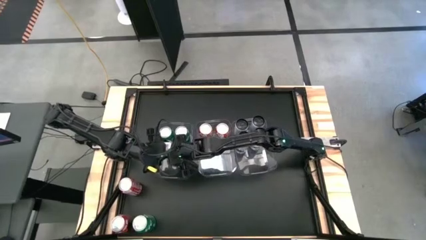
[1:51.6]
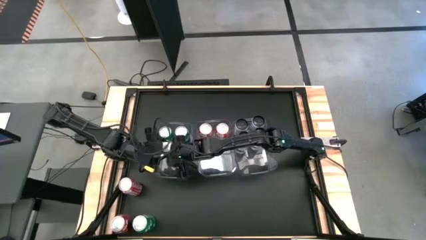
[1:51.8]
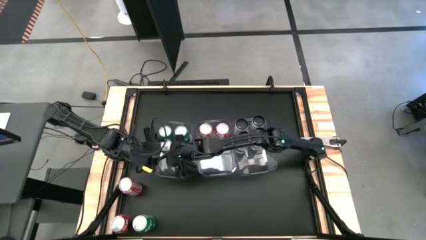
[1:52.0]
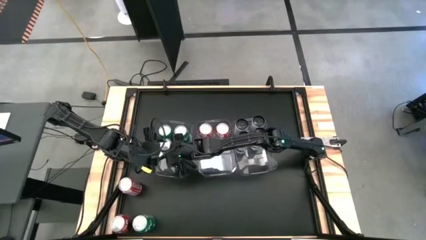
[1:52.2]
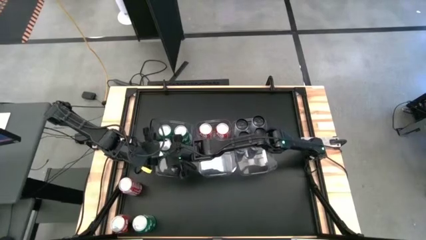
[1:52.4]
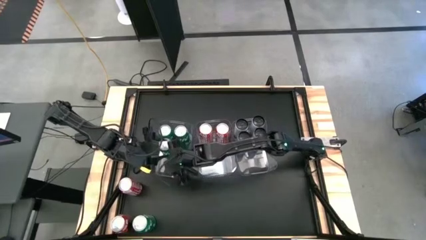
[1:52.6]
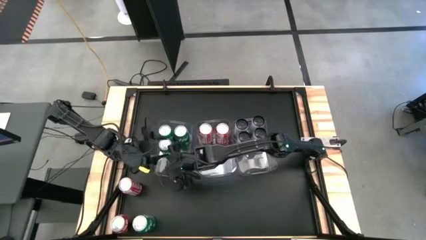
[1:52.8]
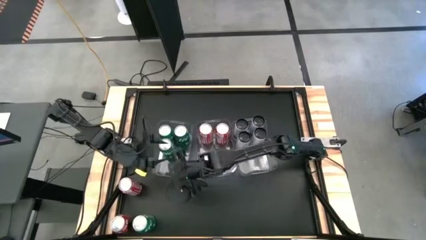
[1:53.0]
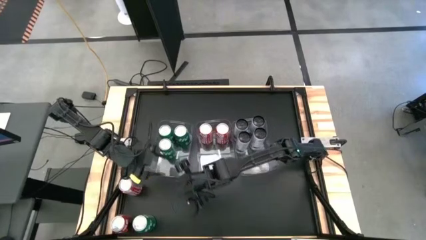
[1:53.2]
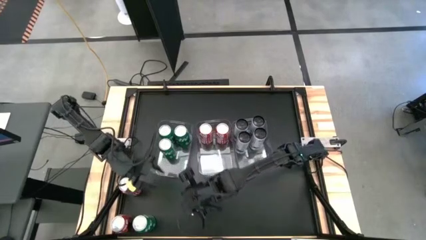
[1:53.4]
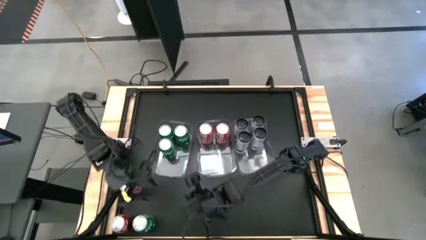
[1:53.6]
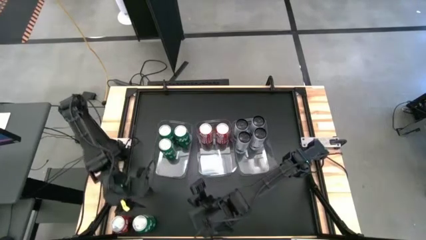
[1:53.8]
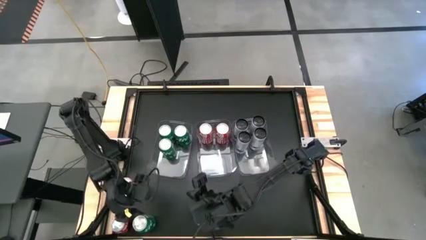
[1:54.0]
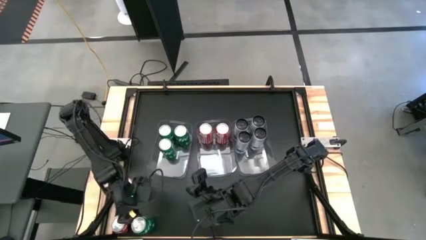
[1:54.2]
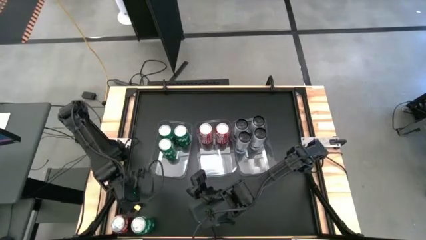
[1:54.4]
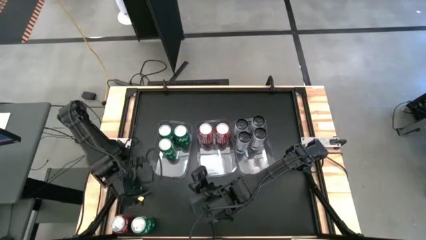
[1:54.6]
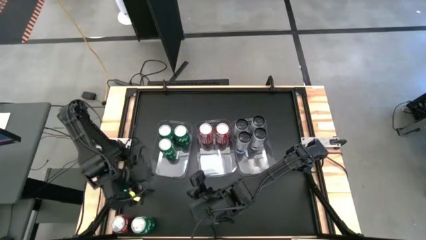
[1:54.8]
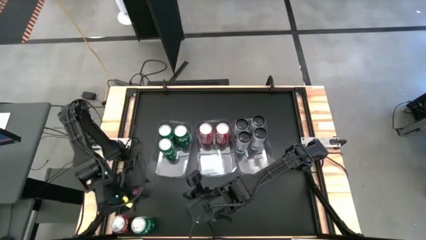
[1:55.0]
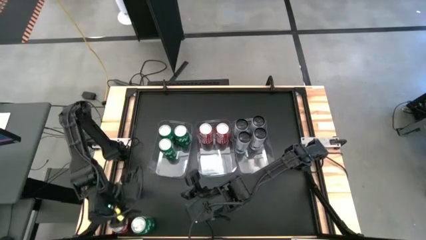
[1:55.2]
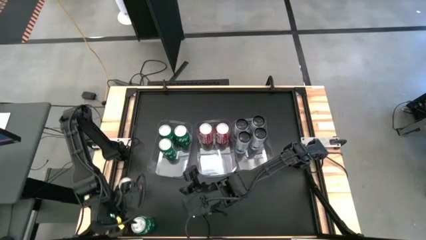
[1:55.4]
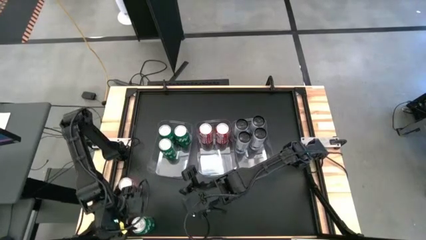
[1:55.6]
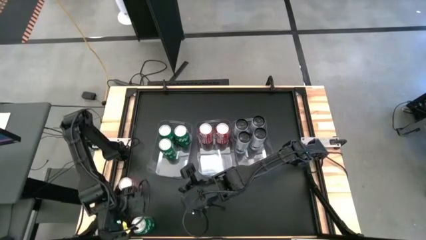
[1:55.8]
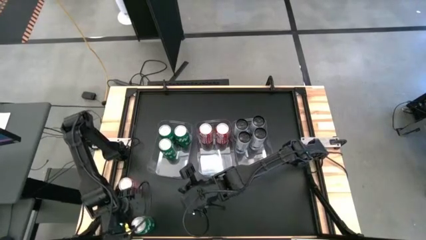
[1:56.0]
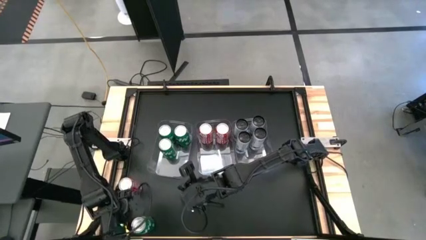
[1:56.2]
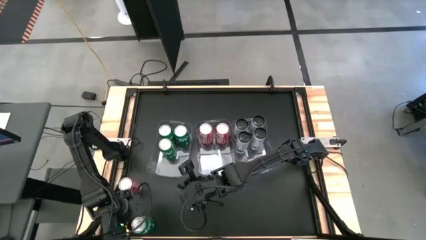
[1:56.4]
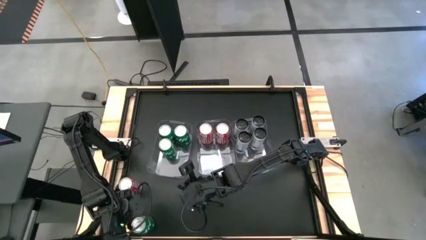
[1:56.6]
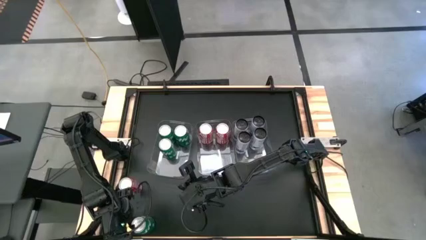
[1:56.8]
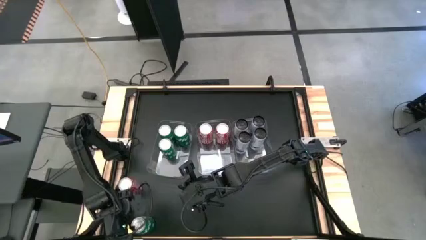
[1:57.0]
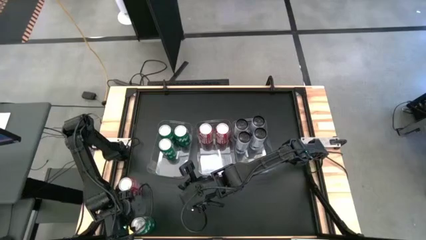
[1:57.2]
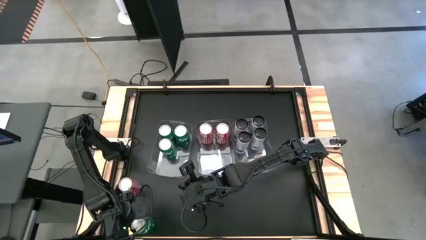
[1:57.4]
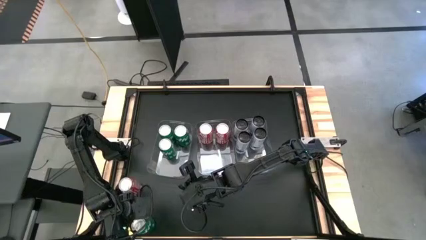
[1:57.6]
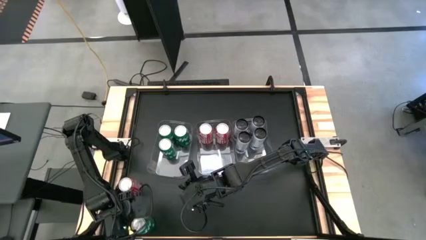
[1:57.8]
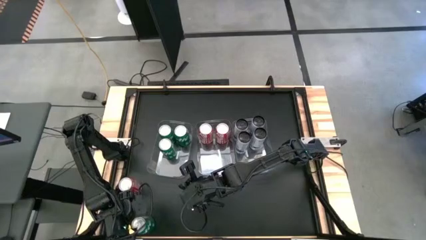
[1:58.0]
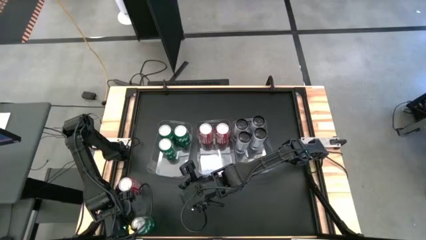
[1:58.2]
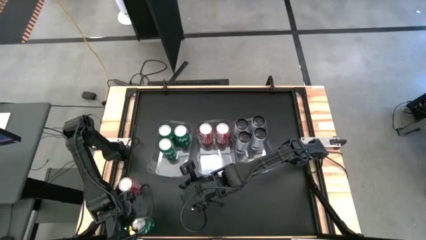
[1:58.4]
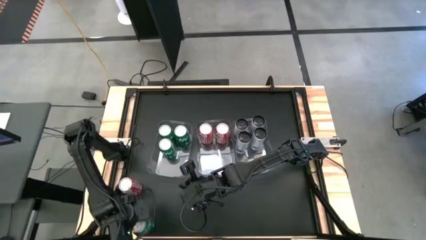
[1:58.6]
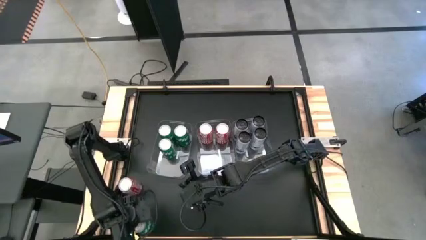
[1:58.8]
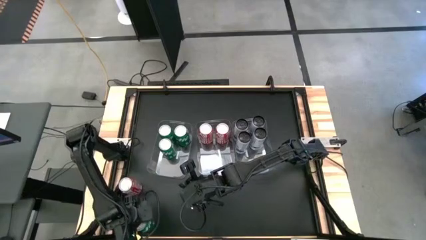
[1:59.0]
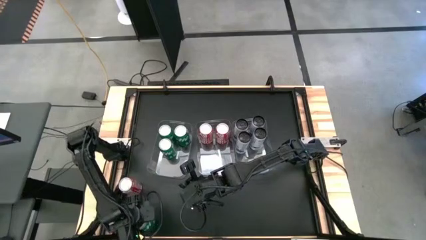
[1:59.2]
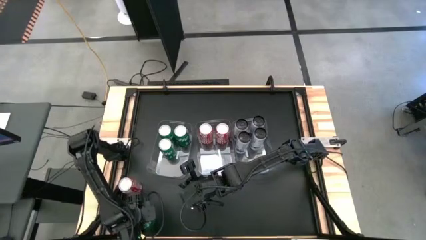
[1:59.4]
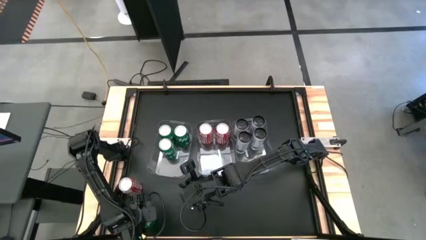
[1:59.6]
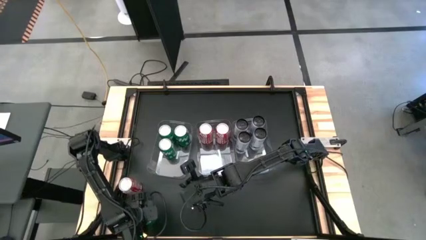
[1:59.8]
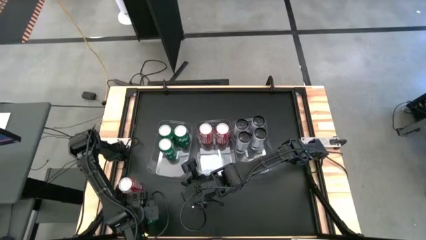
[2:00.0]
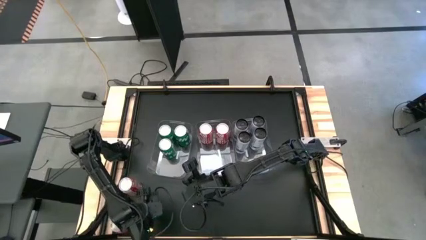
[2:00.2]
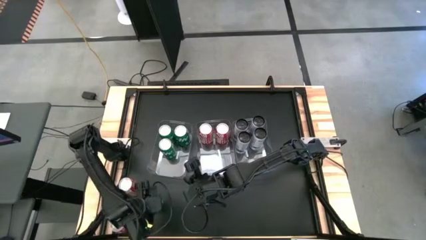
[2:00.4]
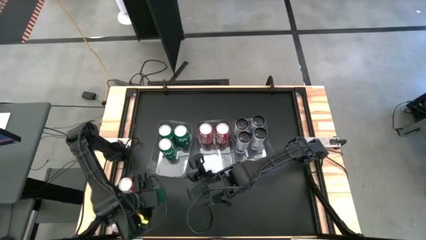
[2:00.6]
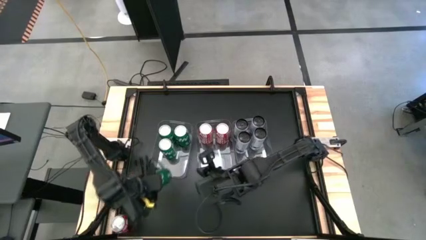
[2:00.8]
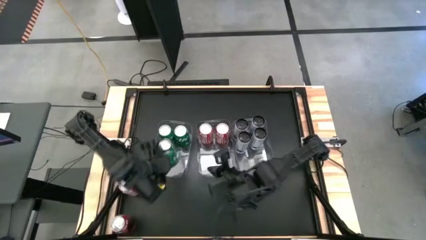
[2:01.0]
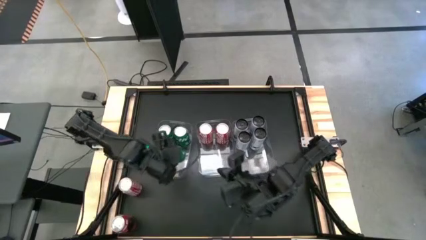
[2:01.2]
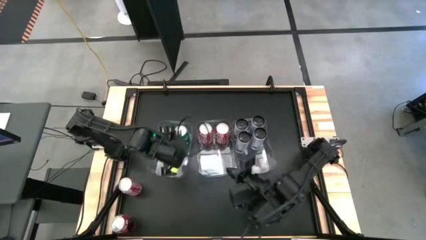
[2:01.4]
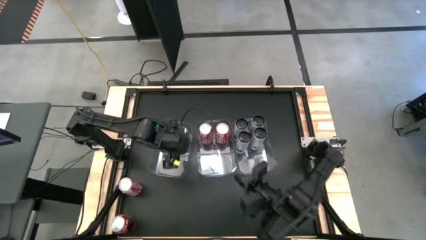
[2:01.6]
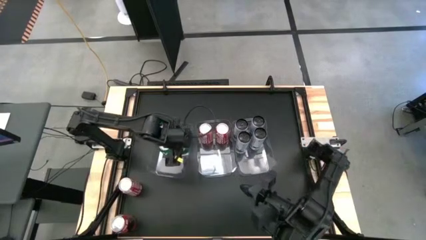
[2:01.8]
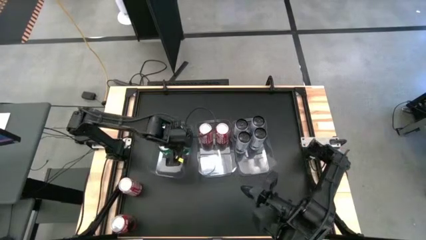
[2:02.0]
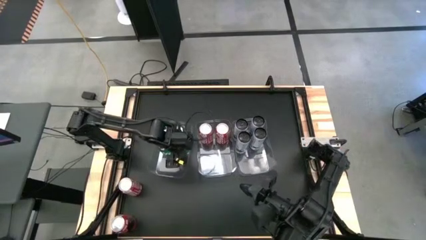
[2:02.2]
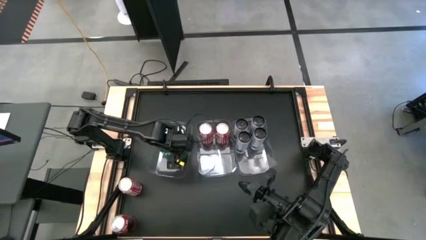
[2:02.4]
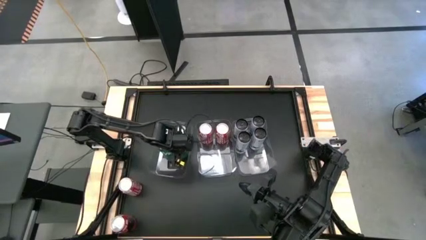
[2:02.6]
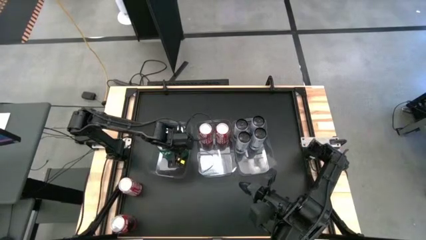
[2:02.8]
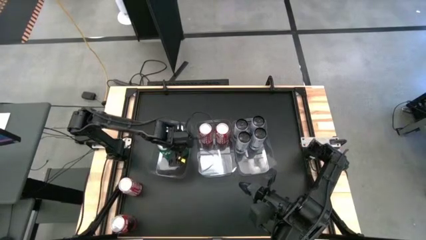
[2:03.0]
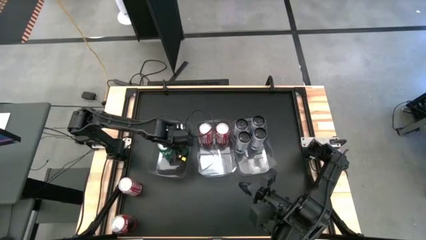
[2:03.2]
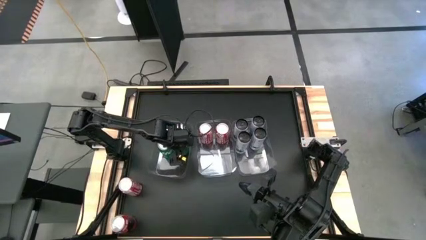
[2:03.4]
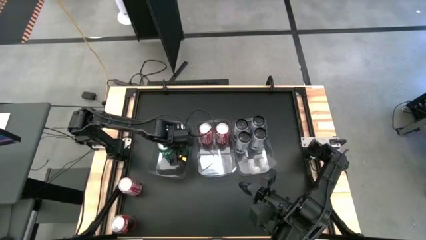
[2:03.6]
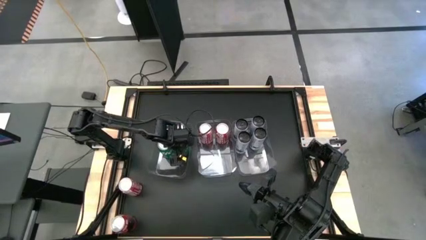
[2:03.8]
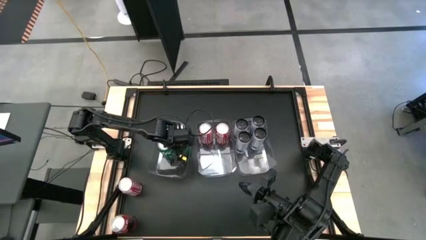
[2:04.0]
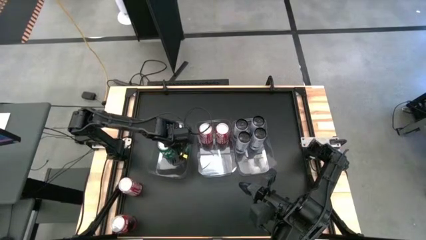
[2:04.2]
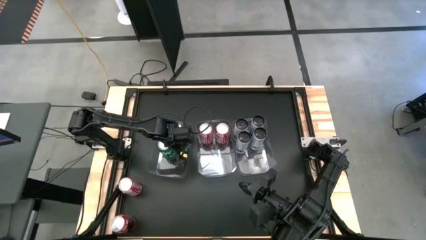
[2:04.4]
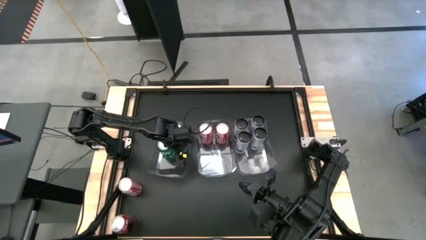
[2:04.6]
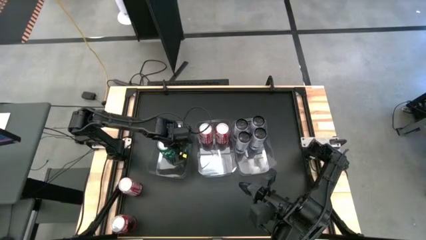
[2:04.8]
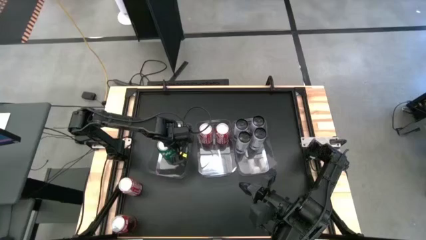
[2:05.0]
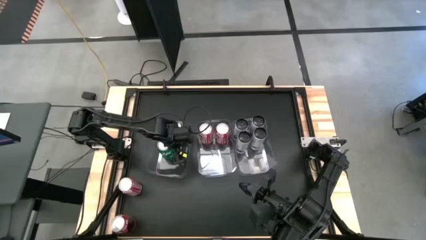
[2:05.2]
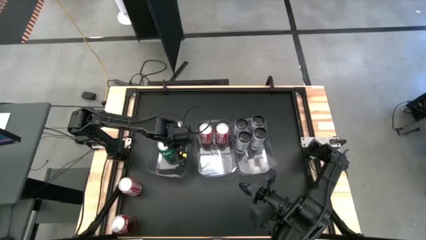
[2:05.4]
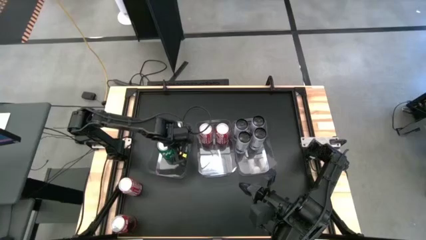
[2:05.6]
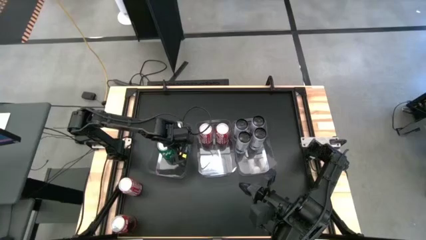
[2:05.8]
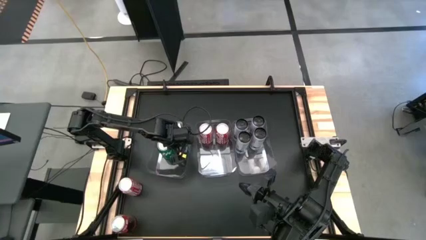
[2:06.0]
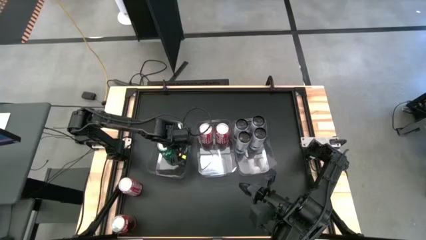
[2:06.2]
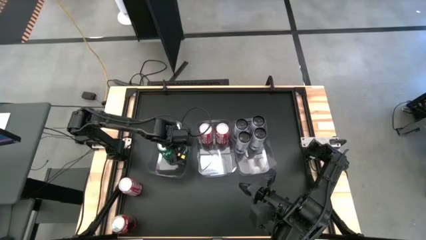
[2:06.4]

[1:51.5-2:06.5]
Task: Sort soda cans
Put the green soda can into the left transparent bin
